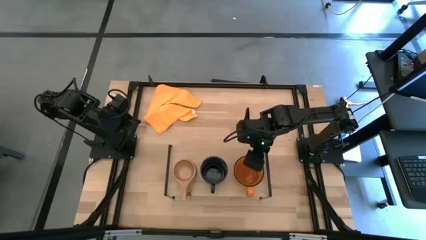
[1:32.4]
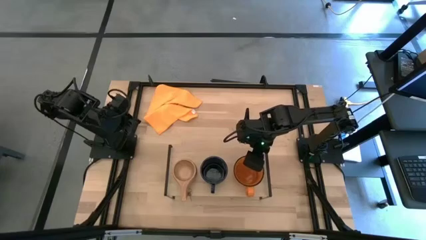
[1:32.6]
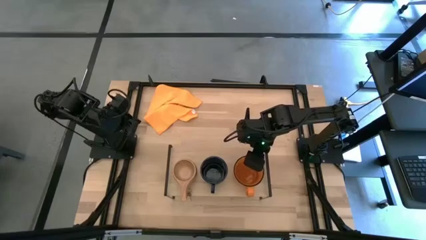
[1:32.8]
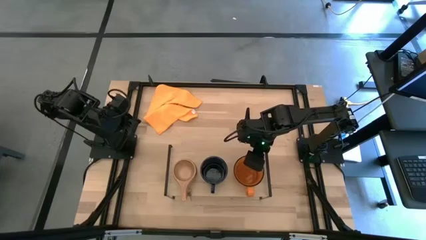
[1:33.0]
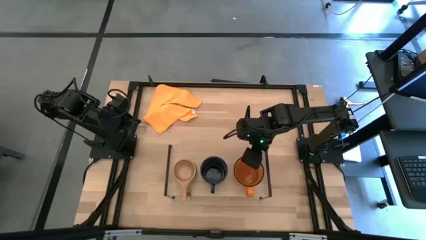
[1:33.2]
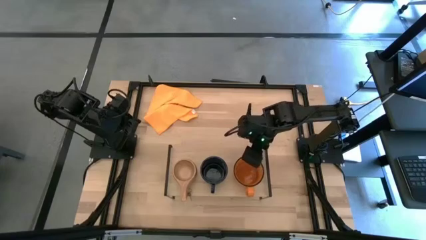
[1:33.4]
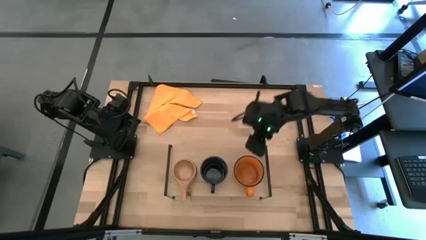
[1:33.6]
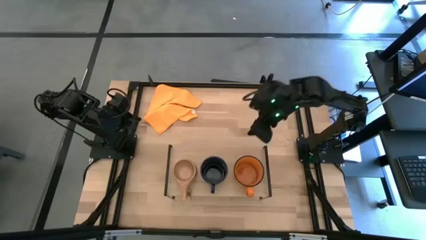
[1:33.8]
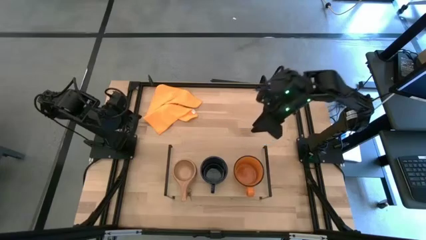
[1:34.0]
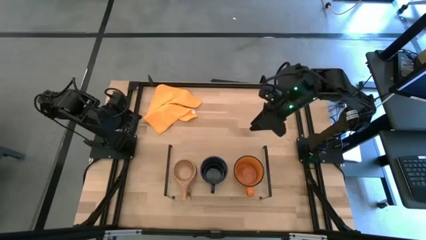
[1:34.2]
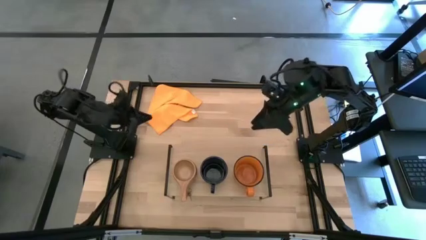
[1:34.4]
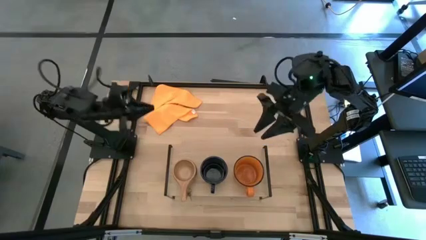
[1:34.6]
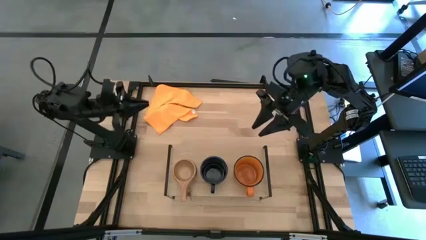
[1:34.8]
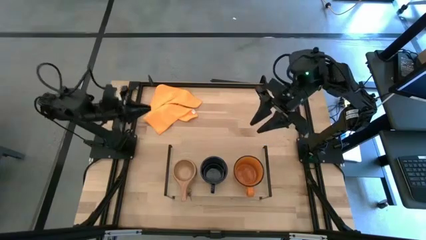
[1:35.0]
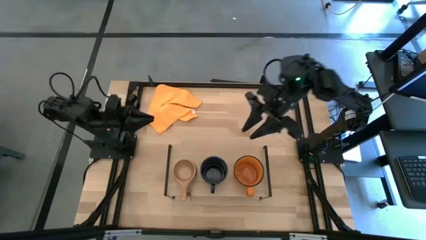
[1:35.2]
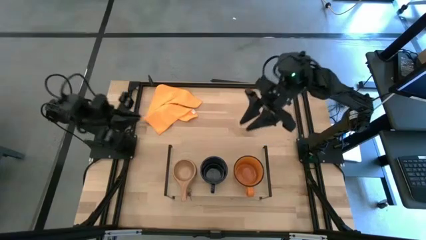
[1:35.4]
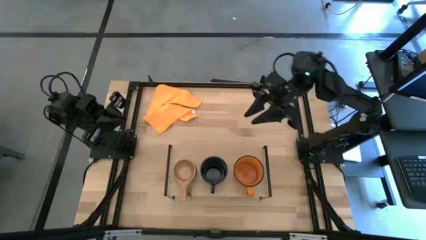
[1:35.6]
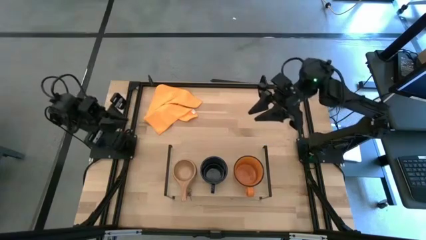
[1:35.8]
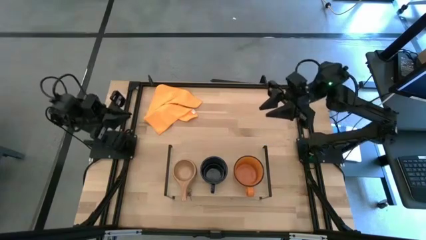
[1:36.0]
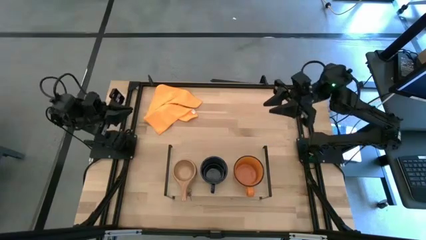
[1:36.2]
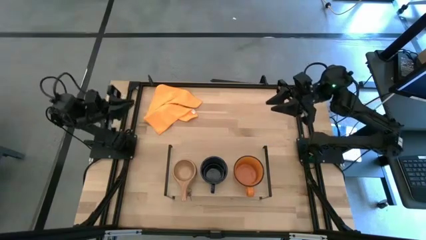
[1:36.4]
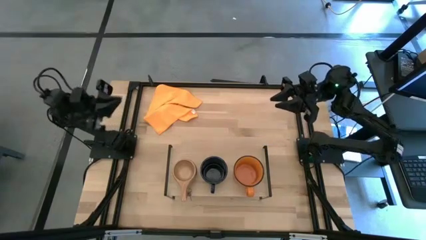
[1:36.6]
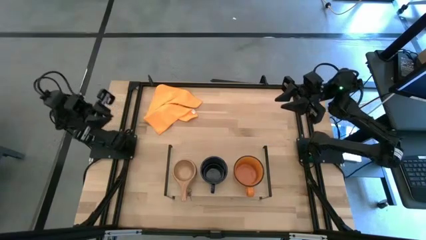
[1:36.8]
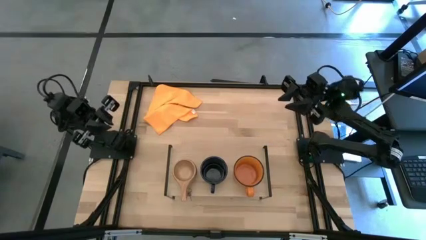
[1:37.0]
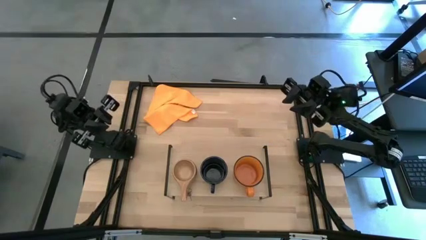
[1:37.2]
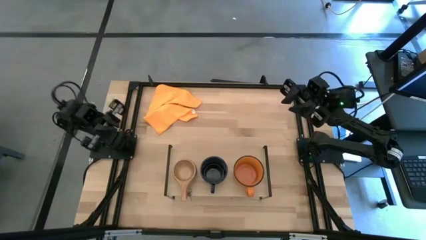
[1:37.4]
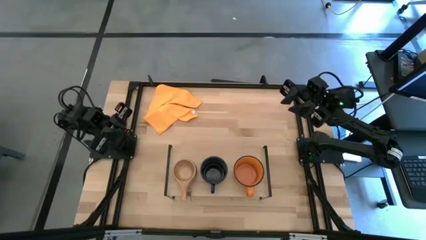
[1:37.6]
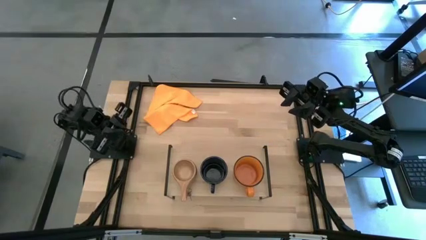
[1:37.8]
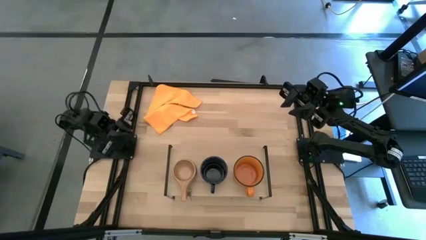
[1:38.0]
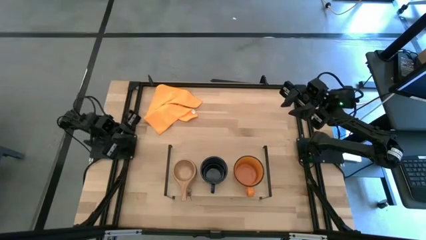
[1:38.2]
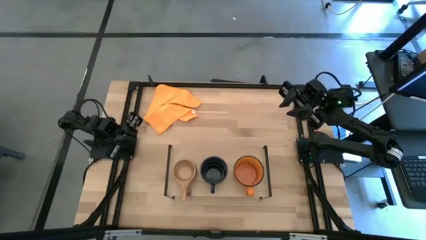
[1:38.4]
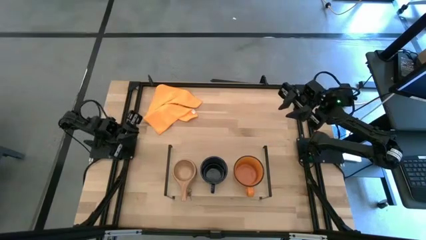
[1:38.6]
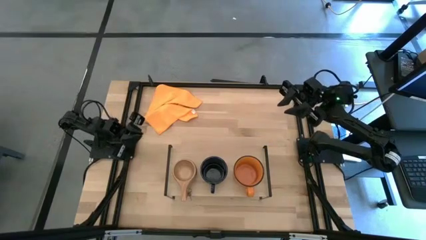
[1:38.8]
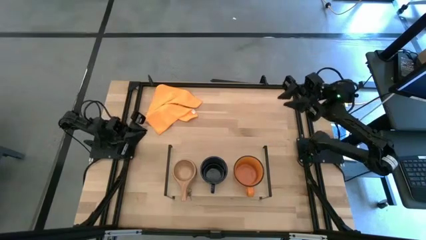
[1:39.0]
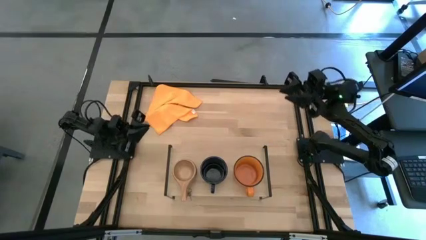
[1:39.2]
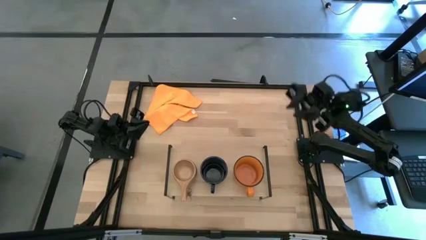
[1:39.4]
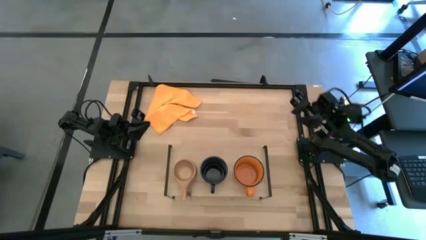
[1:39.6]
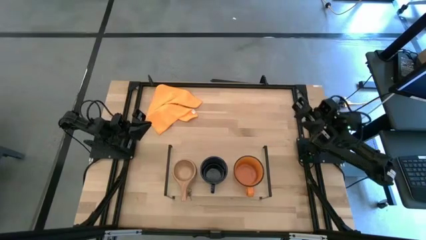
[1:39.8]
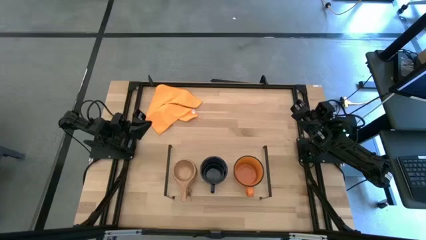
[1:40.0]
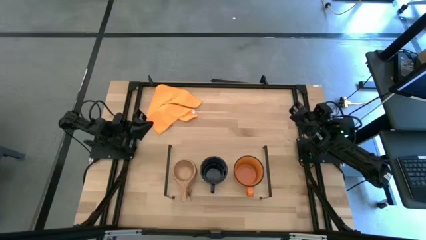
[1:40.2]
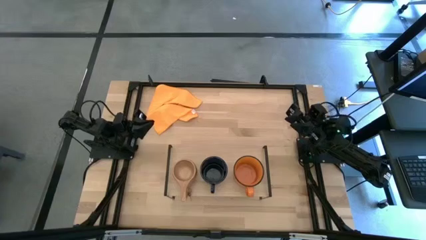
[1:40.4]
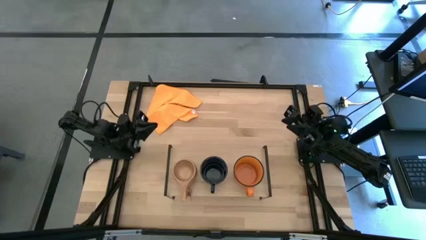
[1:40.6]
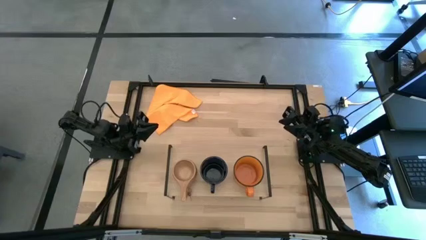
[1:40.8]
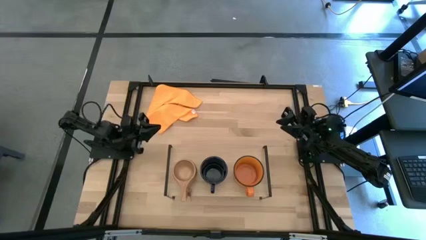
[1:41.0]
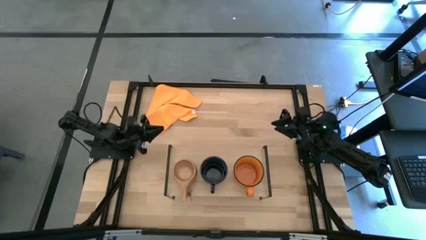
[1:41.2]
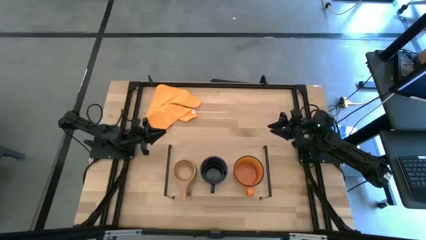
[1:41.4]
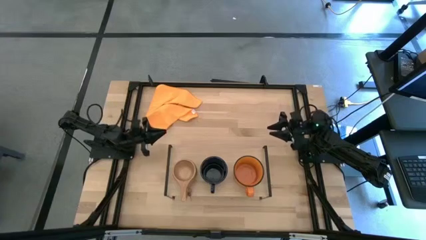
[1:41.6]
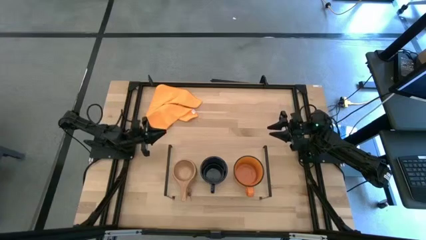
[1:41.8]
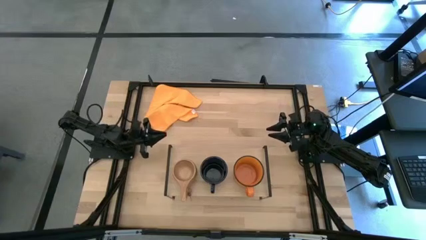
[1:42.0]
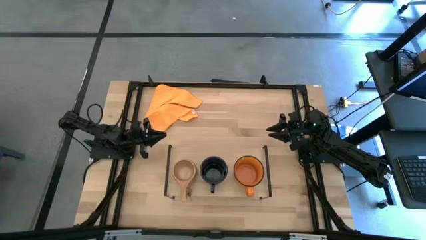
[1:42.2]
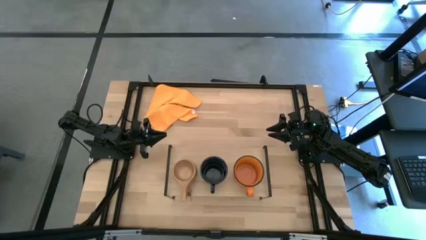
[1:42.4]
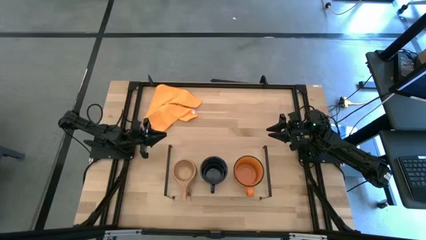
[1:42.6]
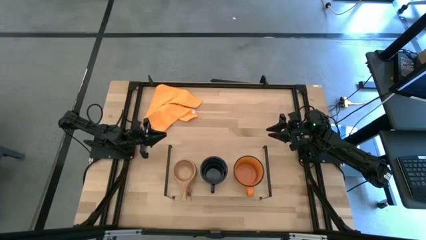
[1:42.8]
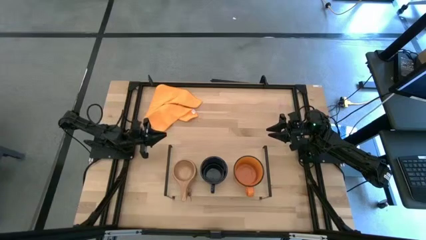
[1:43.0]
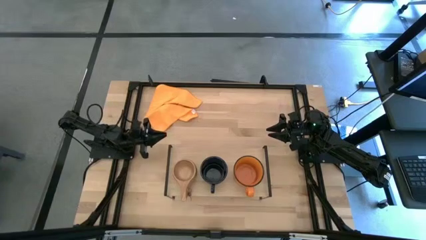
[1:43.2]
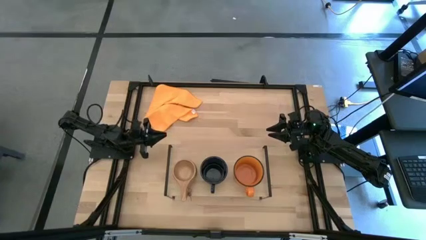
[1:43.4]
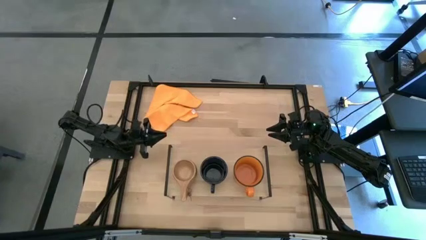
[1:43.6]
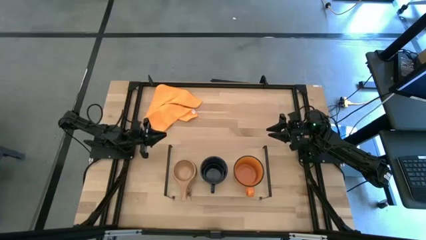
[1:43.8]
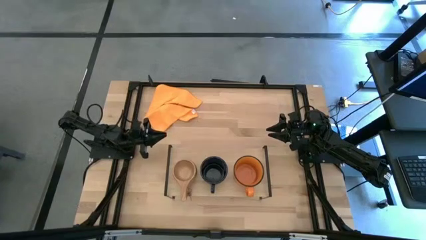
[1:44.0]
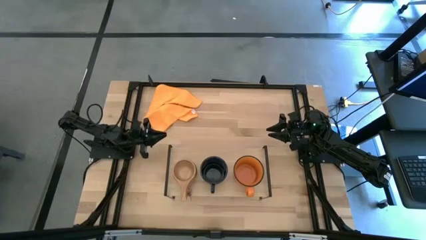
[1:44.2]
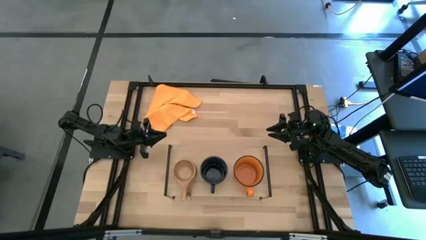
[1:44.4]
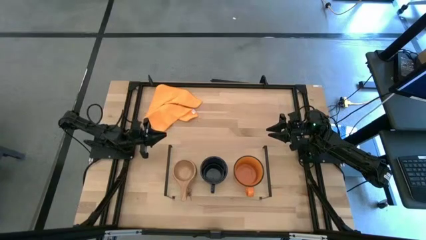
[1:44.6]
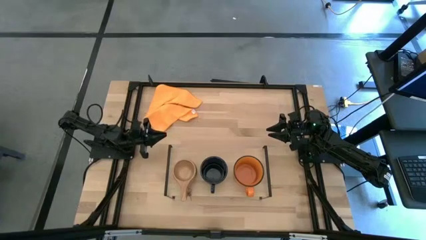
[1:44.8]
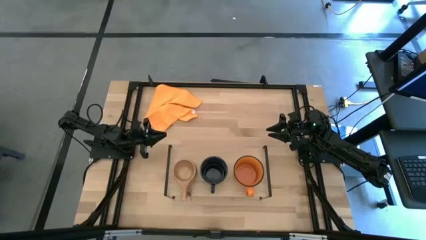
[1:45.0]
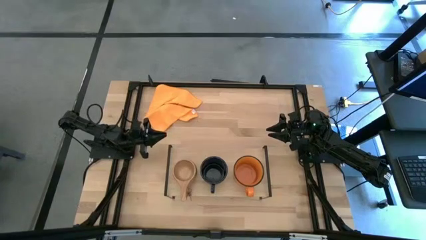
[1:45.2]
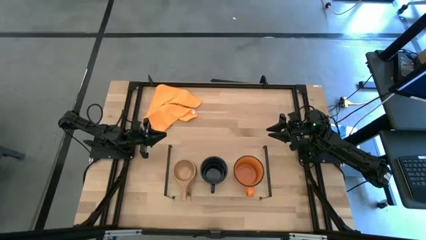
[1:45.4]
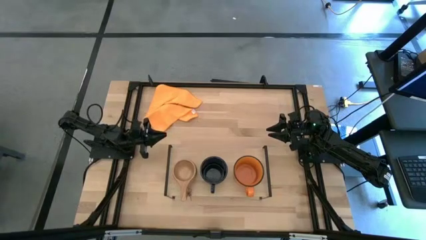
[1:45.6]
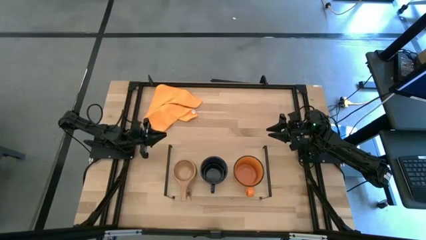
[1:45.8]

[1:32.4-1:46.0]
Task: Stack small to large cups/mugs on shelf
Return to Home Position

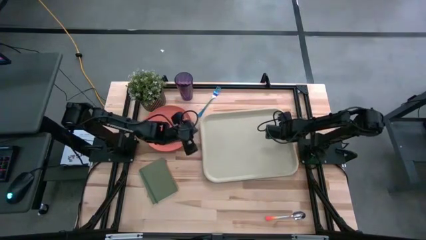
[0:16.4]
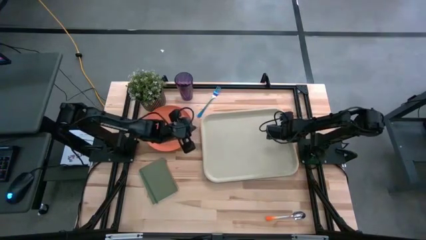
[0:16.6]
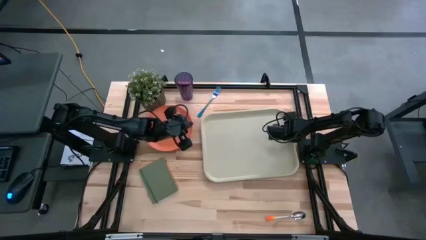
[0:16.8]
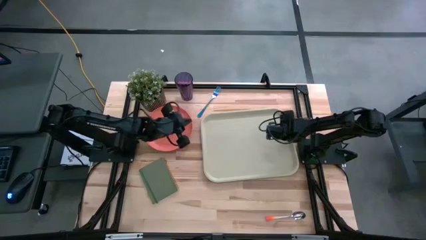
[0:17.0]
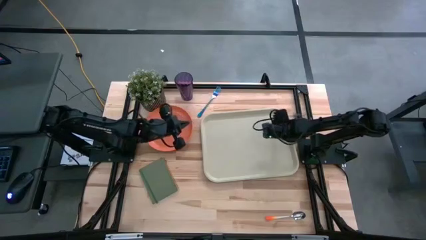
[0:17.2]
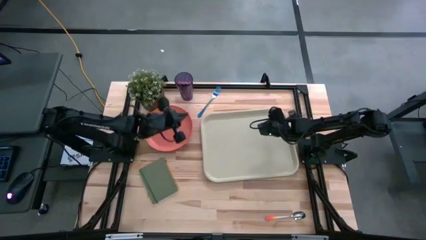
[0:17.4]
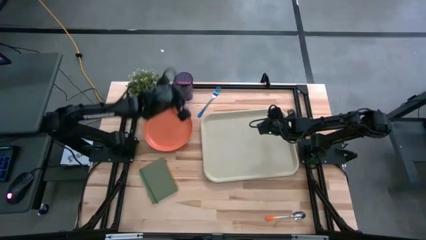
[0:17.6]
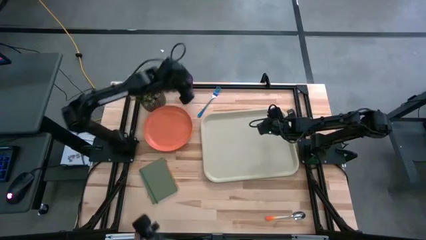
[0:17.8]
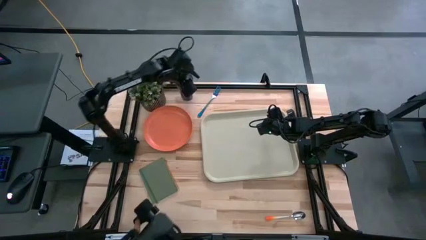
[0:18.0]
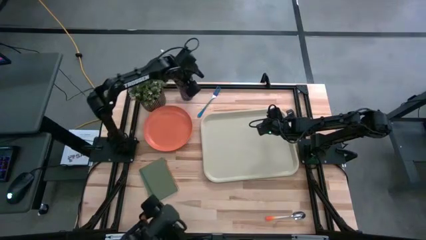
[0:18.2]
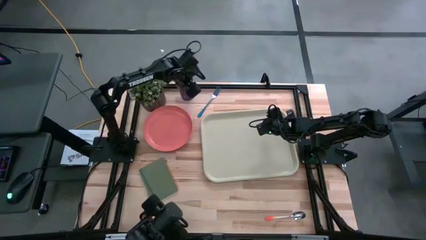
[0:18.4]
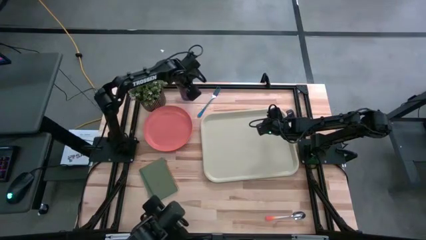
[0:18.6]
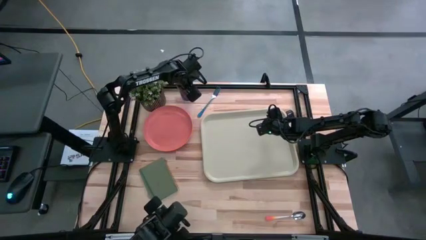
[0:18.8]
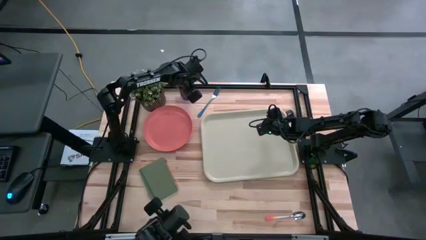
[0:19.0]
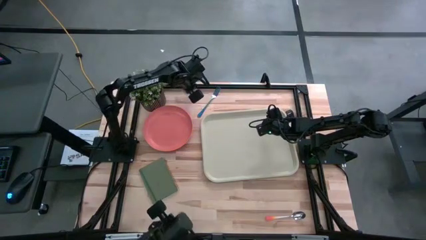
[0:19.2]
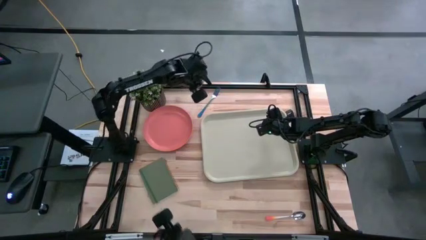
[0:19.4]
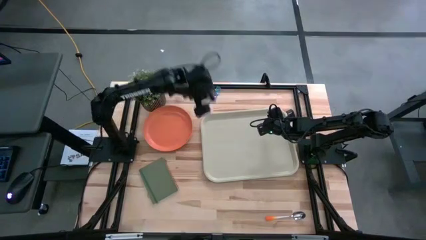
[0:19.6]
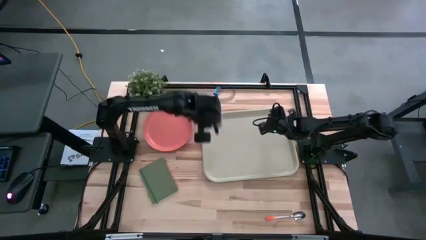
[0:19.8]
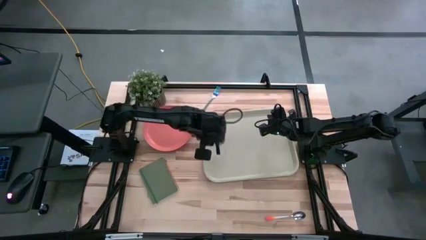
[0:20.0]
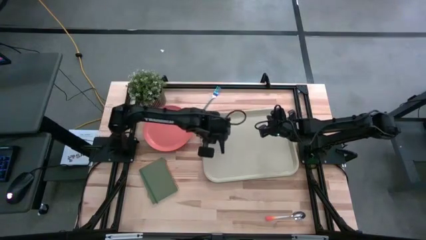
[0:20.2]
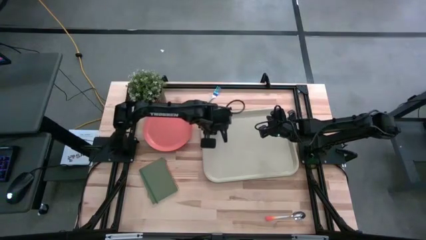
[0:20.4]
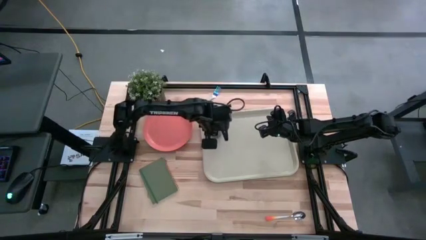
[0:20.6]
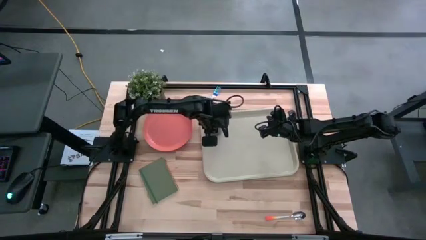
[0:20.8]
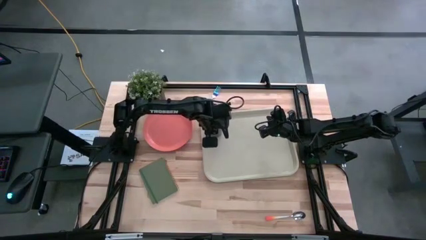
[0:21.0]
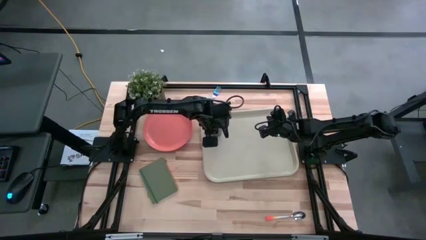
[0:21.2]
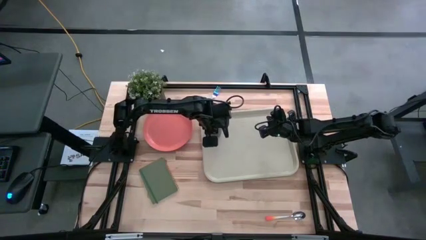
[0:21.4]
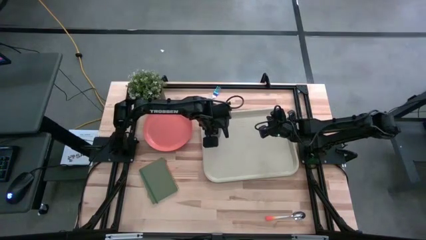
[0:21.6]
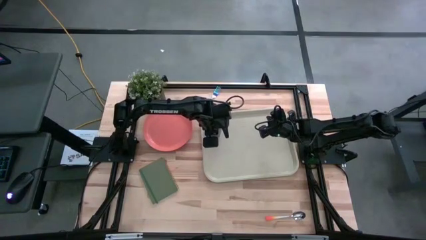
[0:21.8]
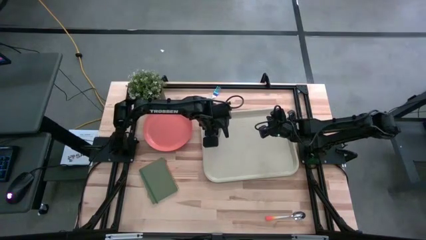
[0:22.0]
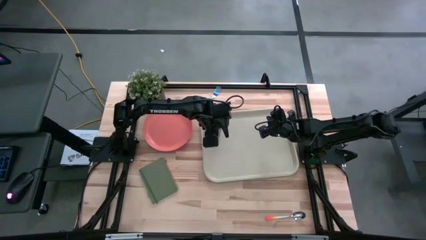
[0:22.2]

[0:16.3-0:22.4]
Task: Pick and place plate/cup/fork/spoon on tray
Put the purple cup on the top left of the gray serving tray
